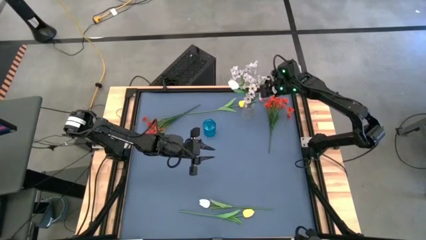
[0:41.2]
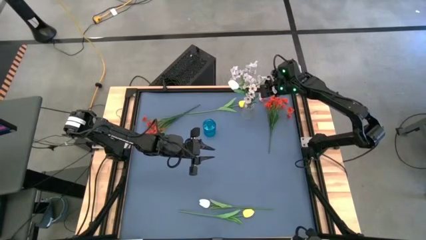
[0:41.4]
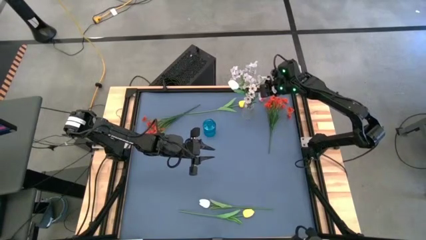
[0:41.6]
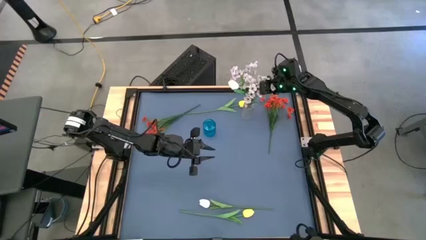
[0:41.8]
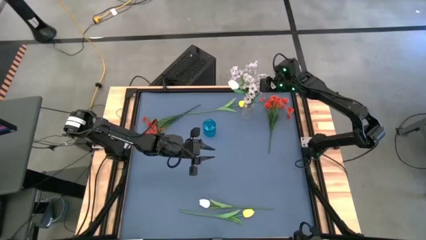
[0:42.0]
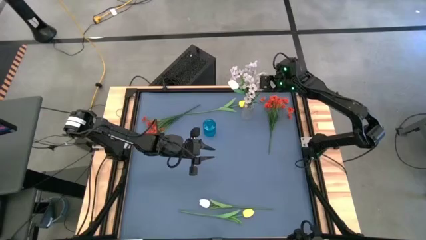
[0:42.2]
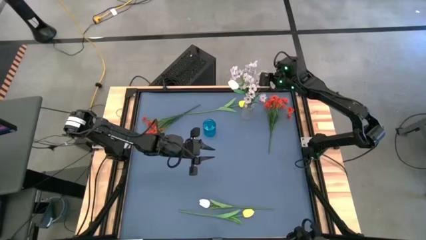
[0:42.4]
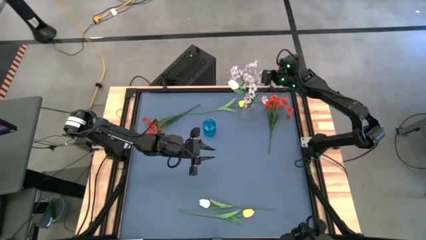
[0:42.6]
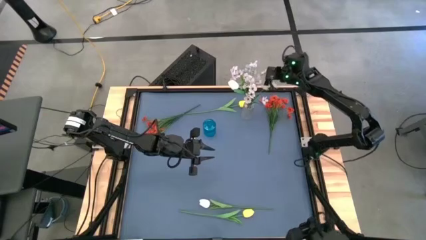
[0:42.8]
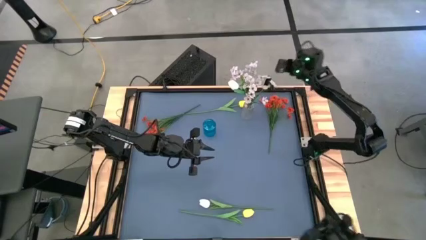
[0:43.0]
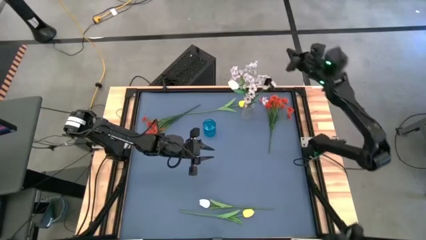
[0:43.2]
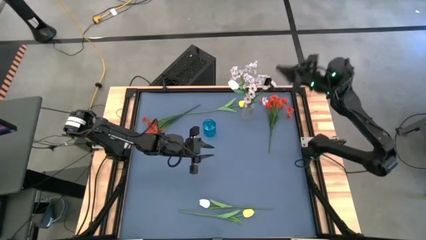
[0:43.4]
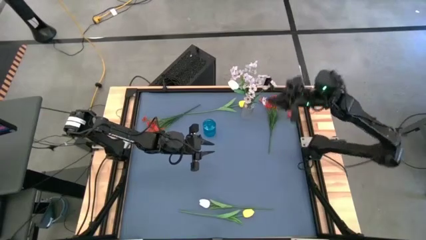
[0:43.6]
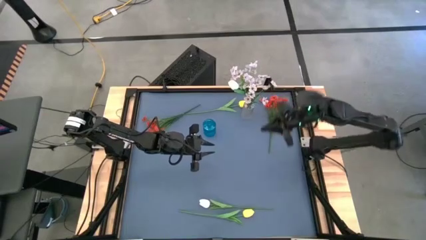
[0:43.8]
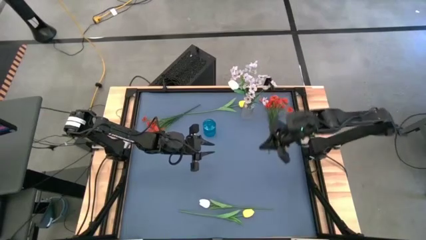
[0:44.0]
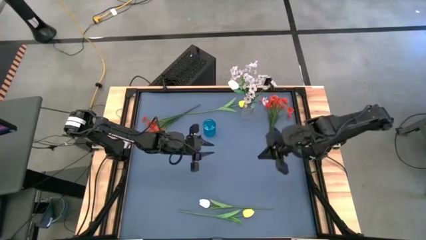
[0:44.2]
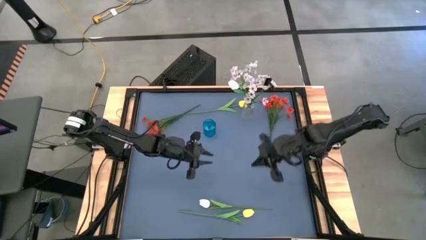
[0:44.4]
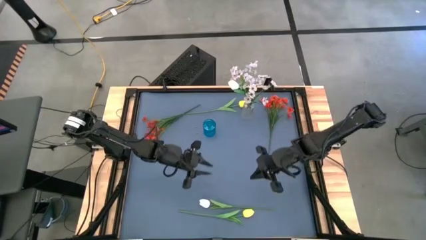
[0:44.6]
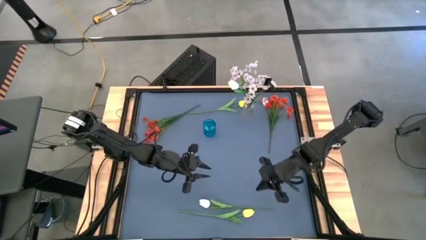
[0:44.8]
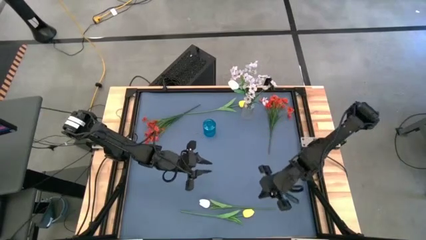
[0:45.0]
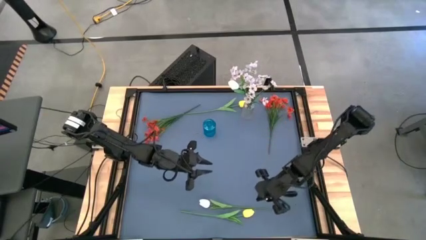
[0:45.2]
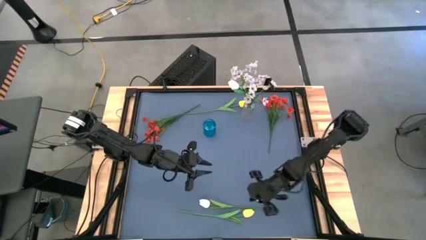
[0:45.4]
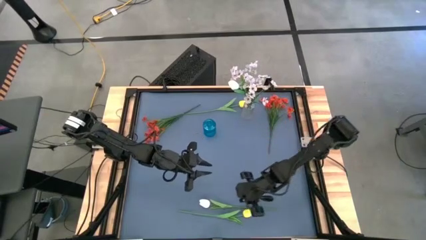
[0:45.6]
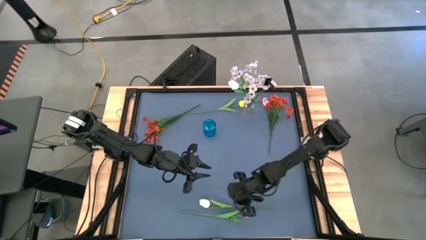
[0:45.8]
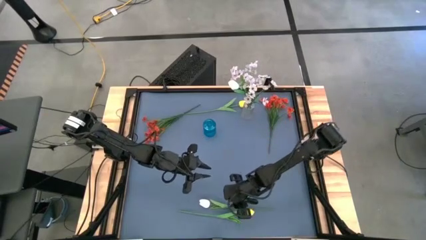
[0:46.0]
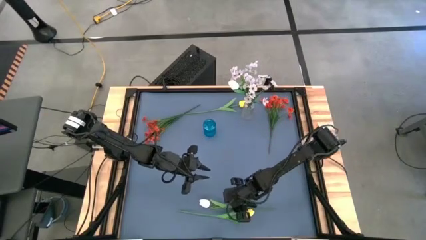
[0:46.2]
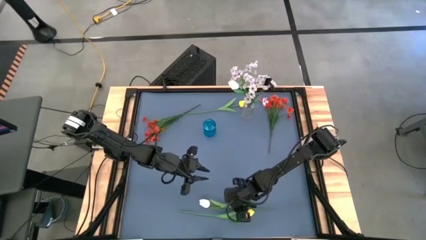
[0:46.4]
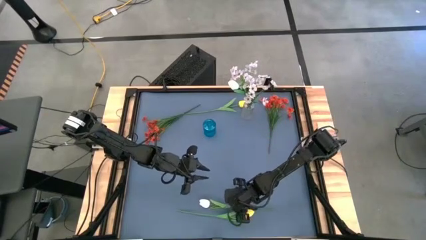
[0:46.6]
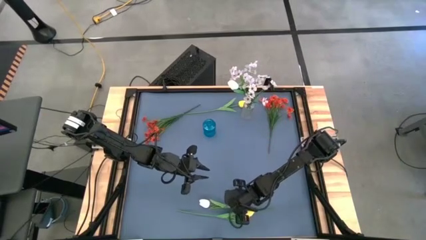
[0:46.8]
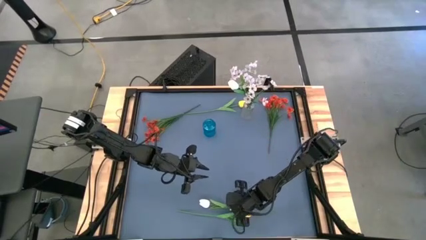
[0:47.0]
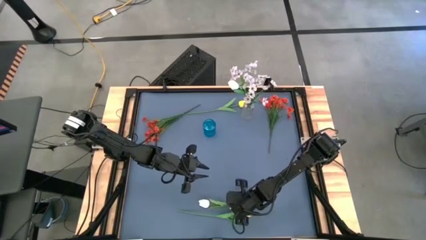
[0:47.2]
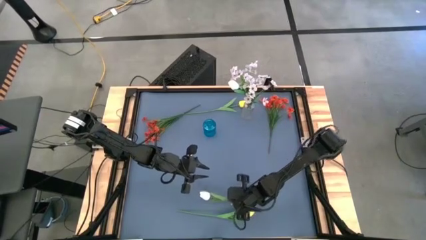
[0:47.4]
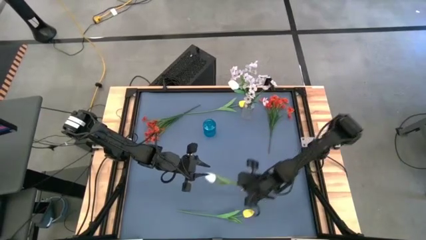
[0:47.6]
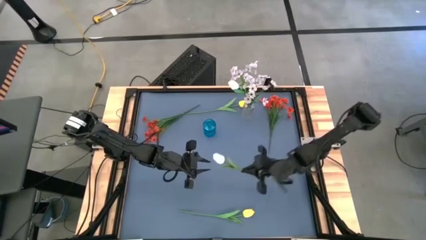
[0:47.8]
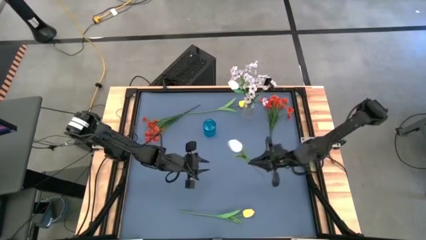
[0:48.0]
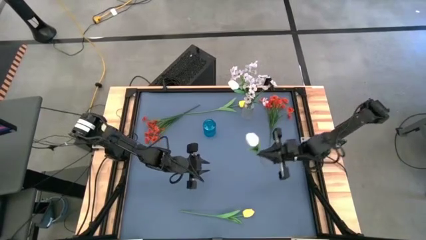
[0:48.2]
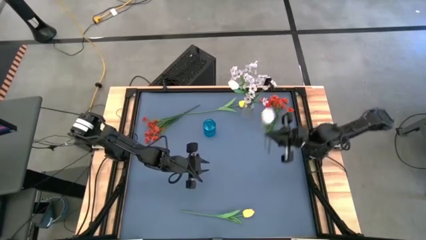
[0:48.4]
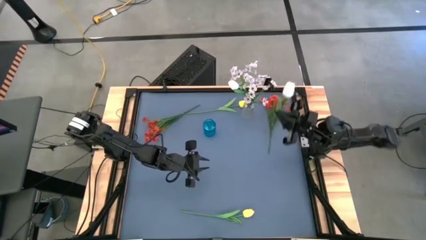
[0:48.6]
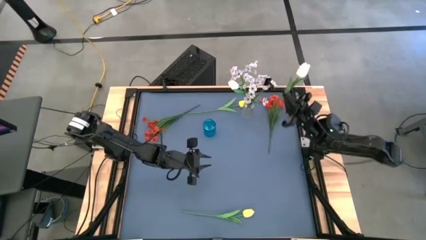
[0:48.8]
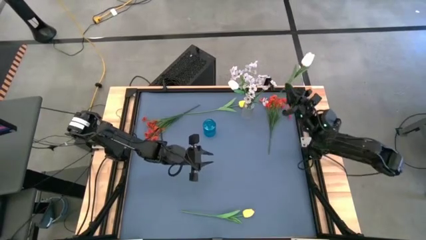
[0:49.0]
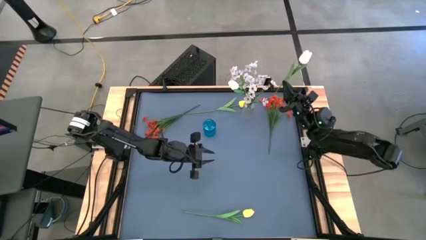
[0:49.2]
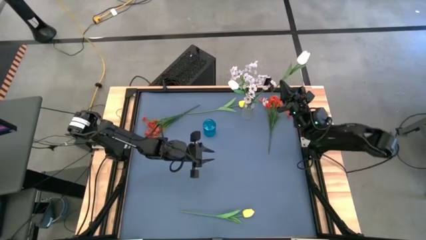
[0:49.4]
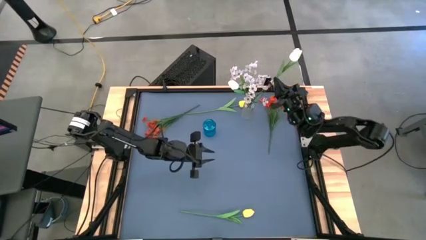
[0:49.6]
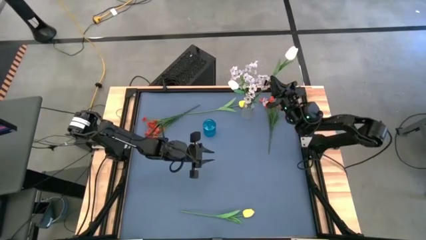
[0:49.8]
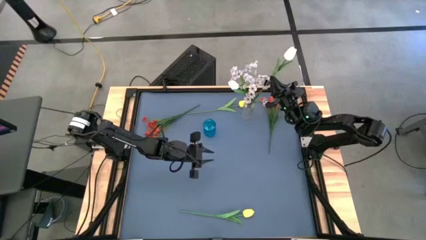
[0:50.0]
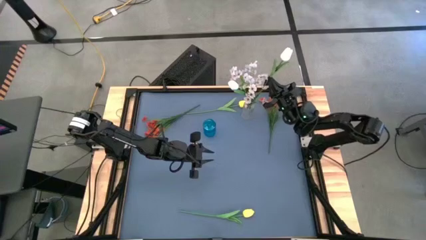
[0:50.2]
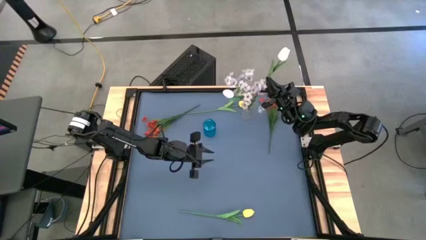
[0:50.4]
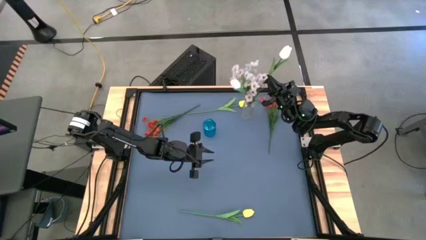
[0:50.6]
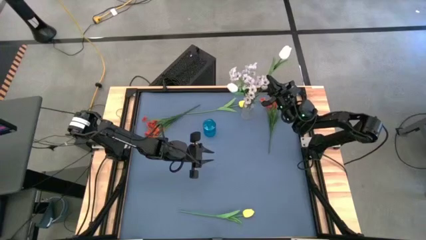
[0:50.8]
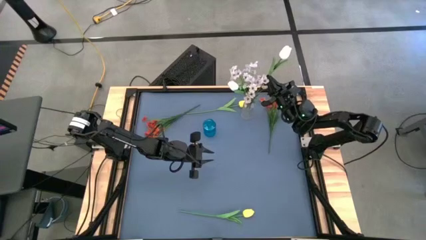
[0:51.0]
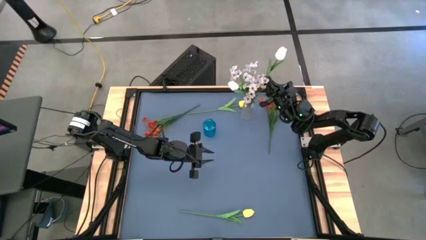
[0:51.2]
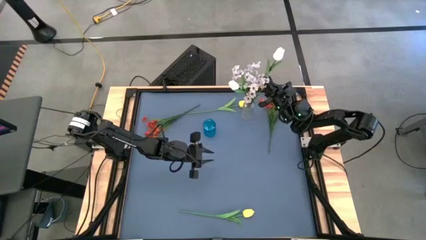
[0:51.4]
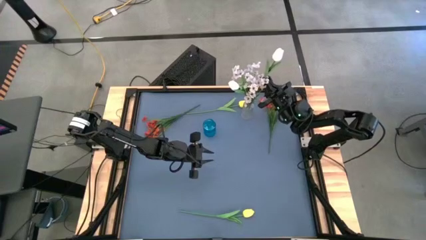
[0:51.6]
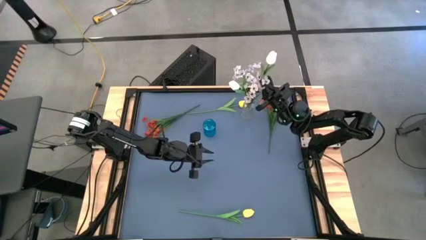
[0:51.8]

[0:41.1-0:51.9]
Task: Sort flowers into vase by color
Put the white tulip into the transparent vase

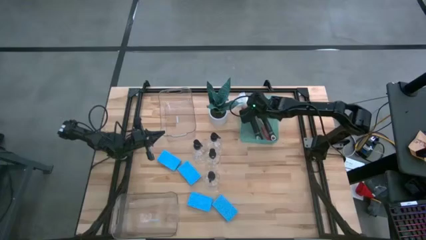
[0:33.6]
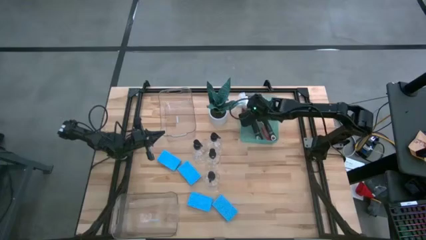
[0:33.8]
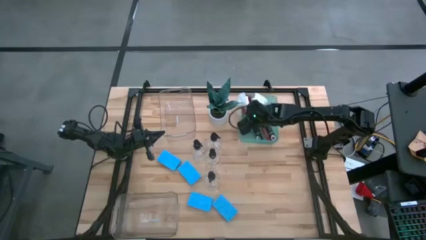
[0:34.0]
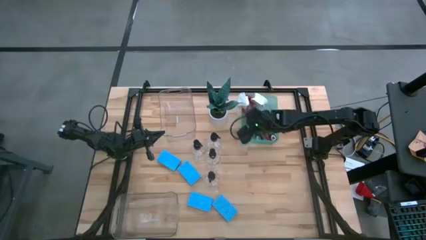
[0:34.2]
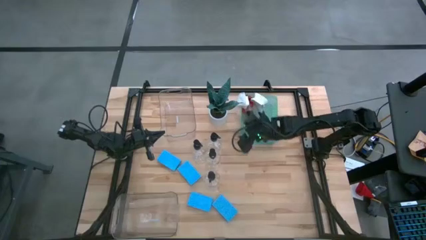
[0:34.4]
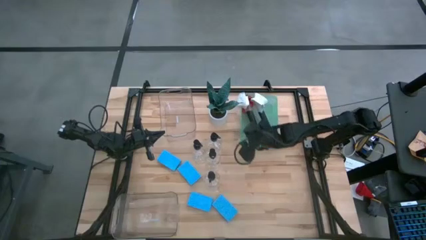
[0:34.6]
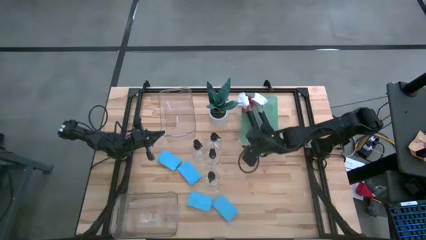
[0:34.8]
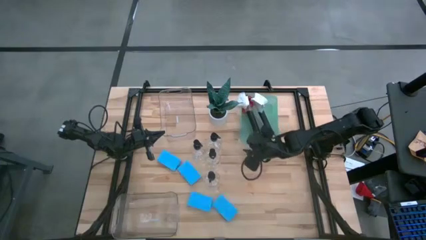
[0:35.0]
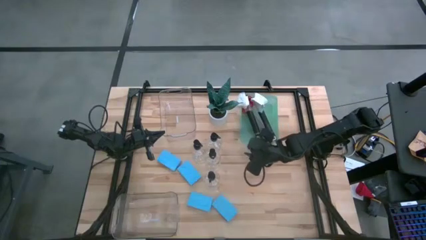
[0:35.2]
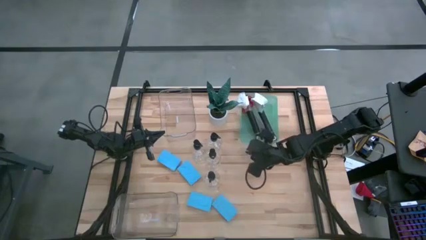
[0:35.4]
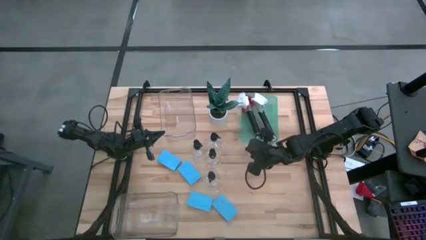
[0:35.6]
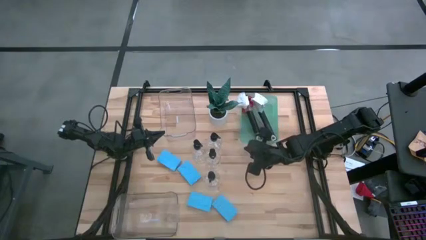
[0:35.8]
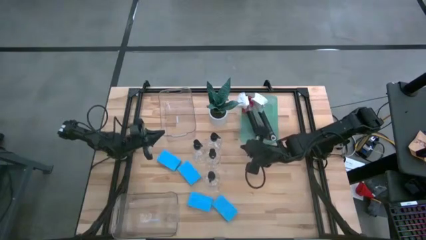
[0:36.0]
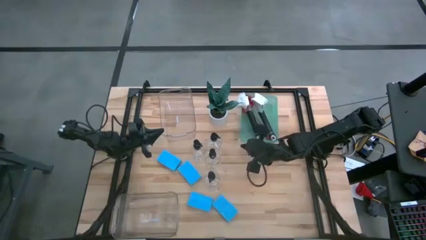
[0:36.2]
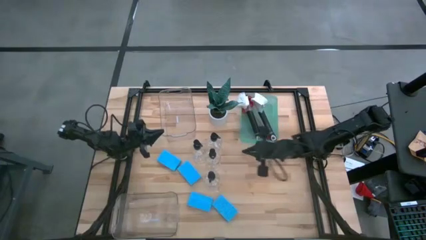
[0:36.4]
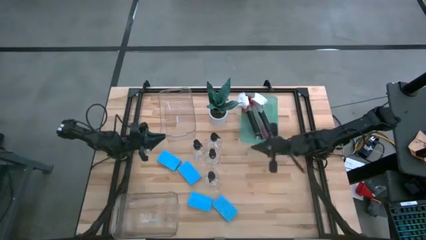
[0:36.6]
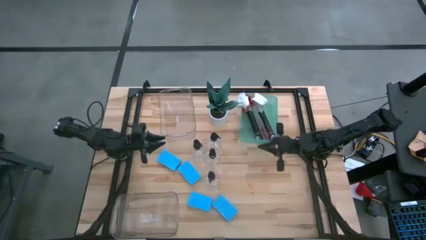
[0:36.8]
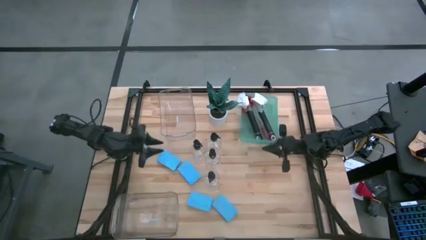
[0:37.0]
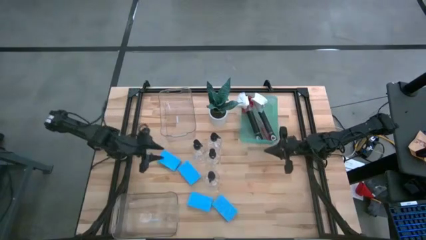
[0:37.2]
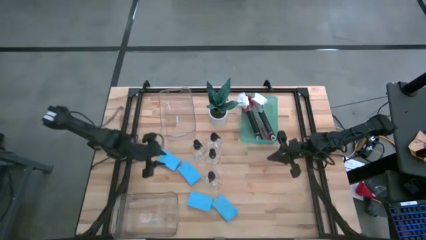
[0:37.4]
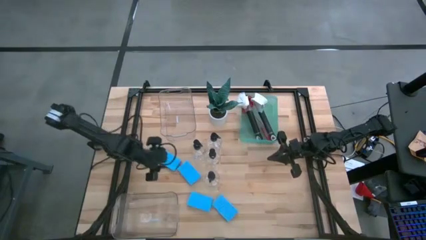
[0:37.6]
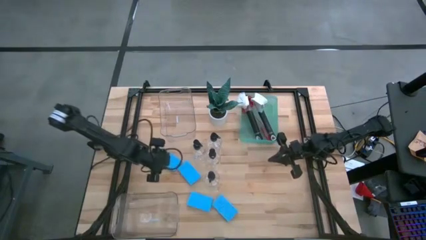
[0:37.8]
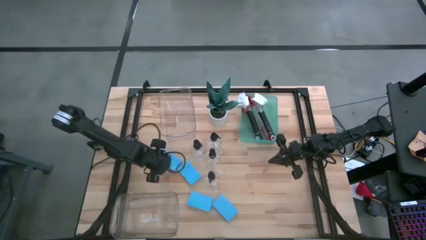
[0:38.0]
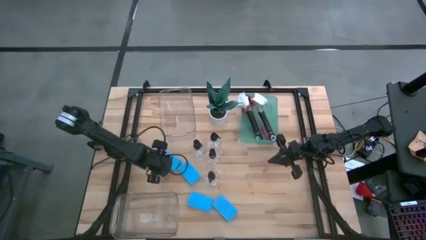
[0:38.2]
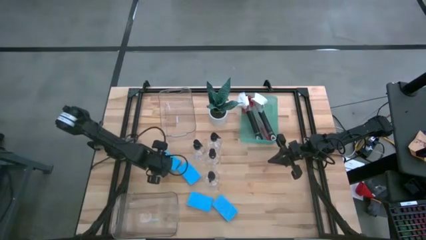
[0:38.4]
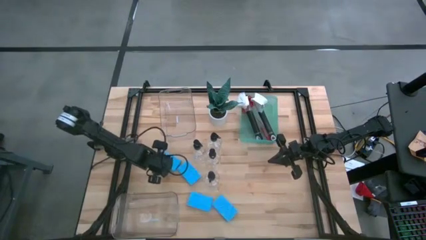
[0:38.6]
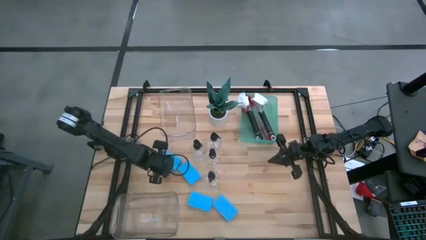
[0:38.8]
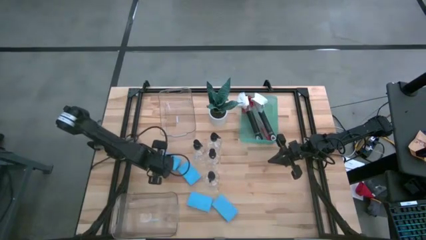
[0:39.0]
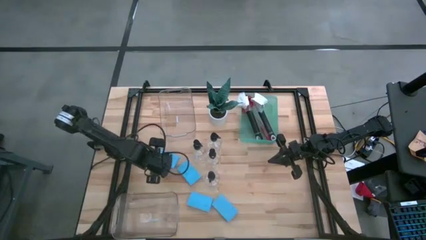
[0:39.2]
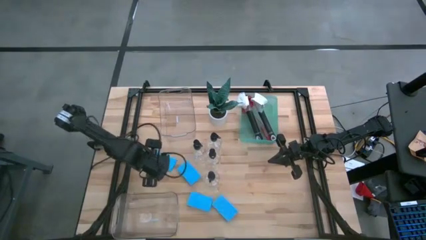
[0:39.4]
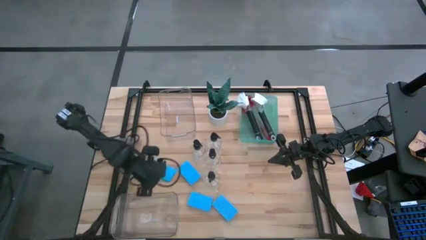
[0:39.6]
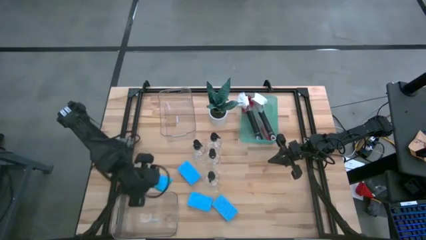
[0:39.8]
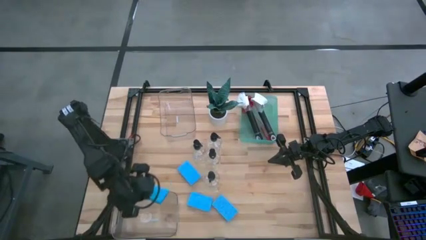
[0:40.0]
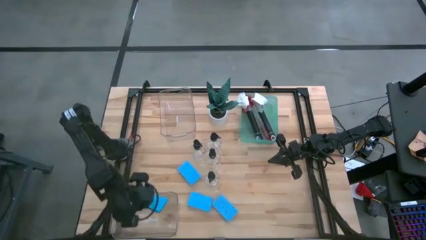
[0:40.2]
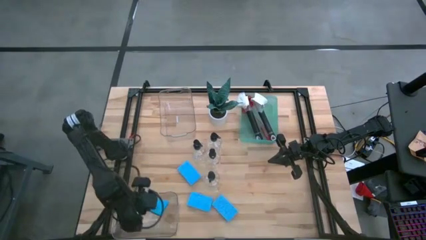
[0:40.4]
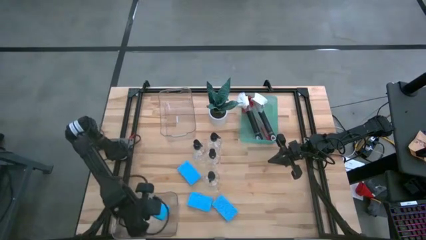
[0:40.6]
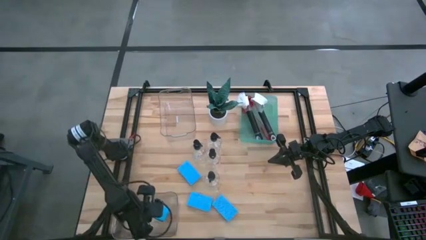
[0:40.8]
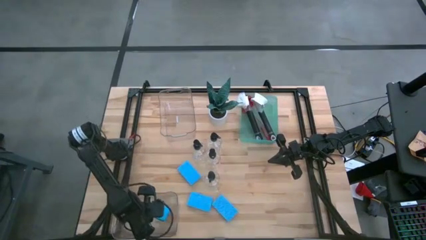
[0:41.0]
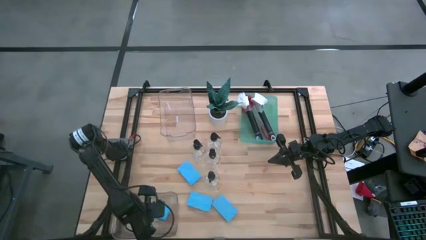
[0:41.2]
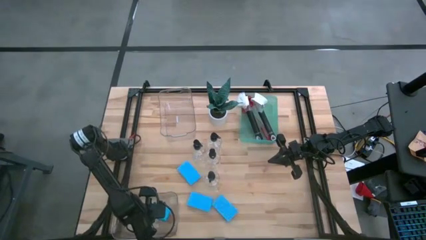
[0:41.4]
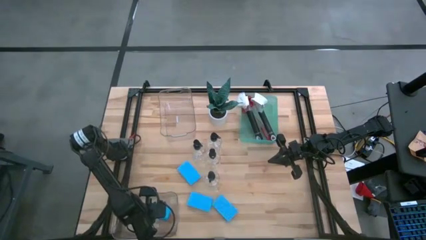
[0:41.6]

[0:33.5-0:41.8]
Task: Pick & Place Kitchen Sink Supplies
Put the blue sponge into the bottom transparent bin
